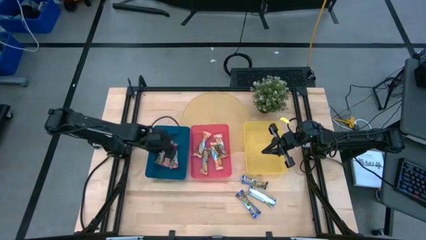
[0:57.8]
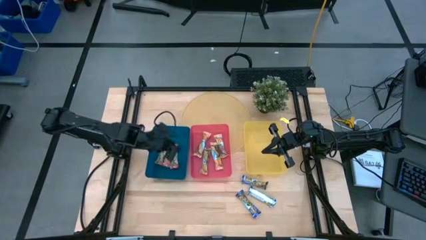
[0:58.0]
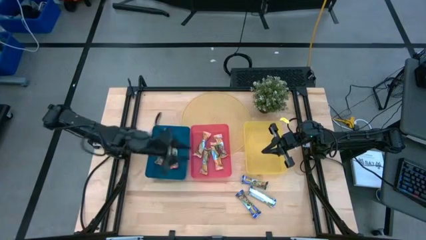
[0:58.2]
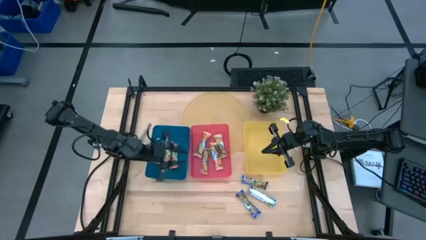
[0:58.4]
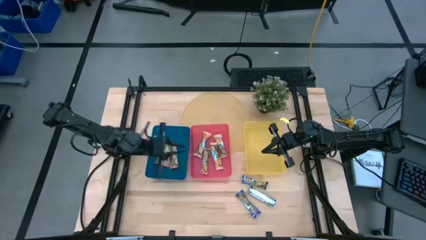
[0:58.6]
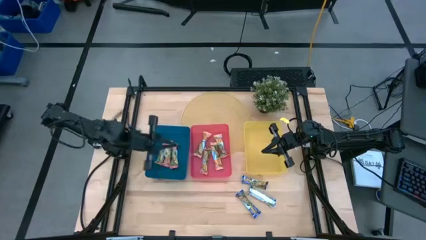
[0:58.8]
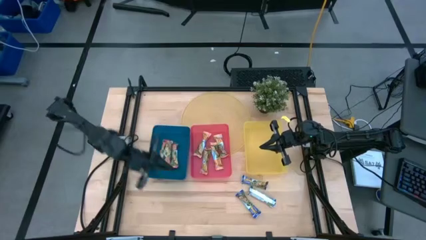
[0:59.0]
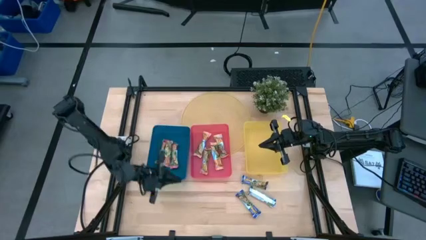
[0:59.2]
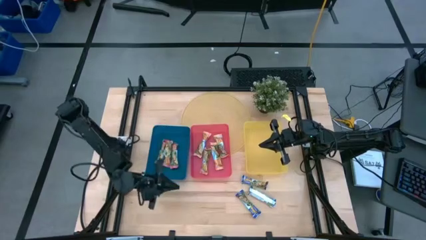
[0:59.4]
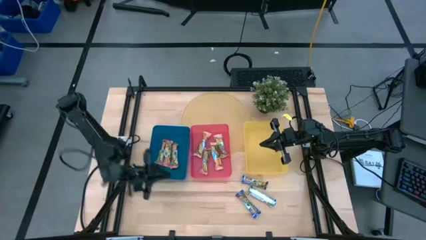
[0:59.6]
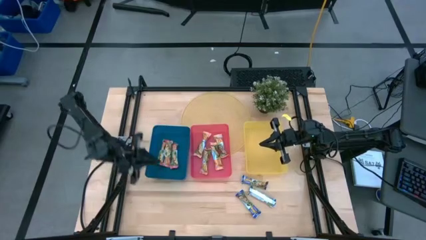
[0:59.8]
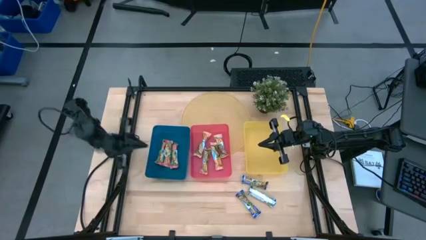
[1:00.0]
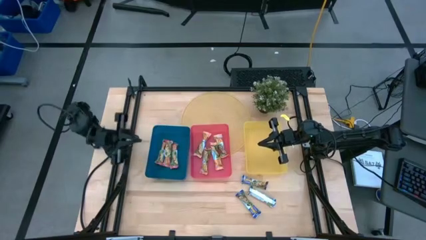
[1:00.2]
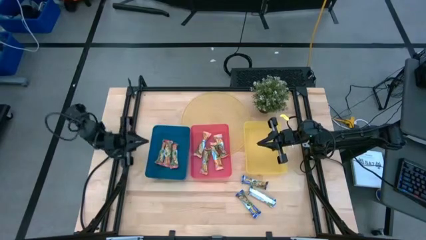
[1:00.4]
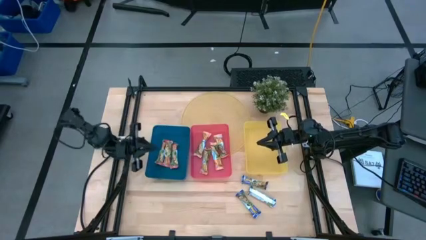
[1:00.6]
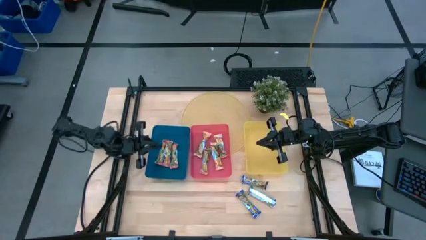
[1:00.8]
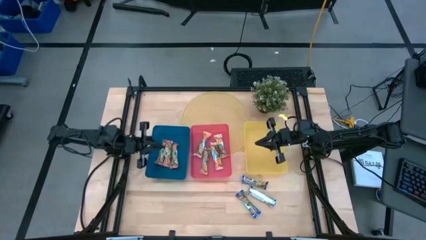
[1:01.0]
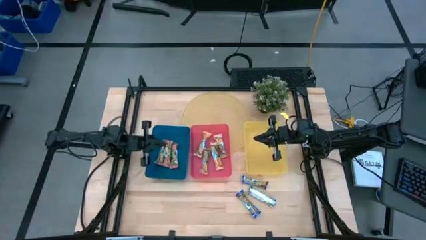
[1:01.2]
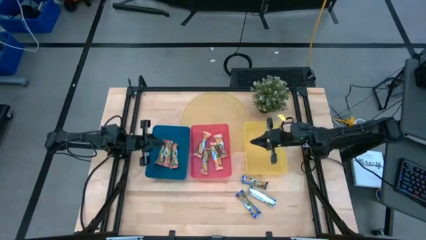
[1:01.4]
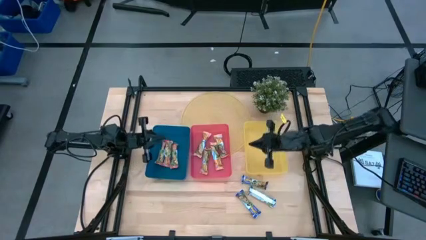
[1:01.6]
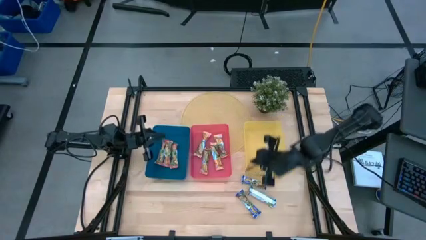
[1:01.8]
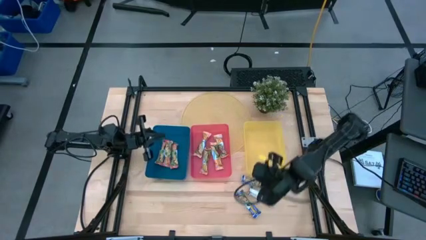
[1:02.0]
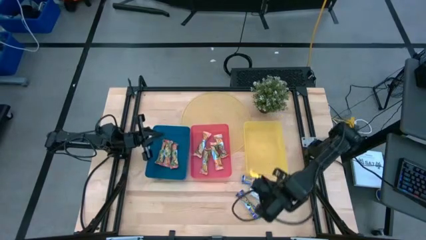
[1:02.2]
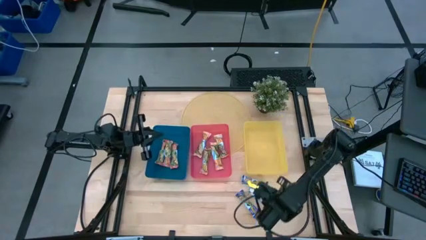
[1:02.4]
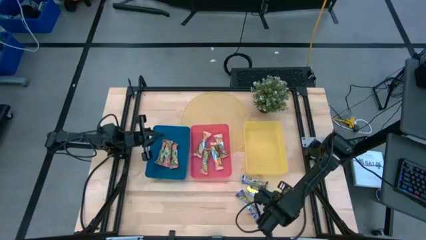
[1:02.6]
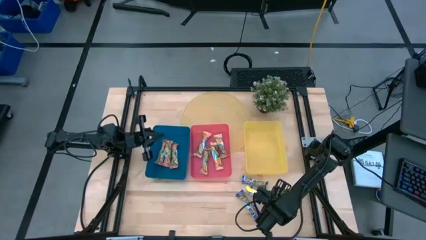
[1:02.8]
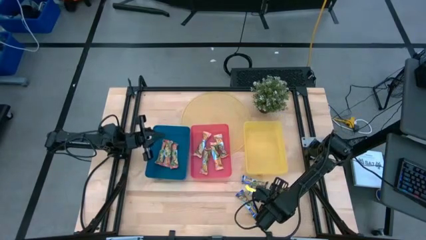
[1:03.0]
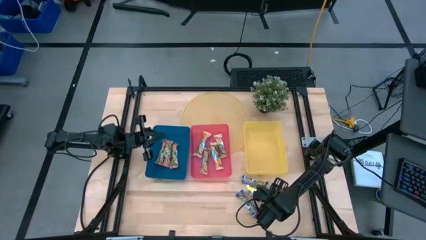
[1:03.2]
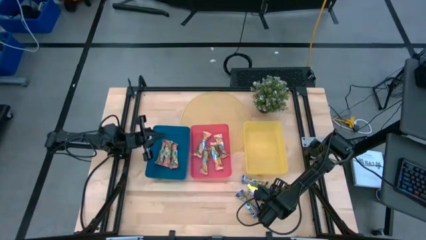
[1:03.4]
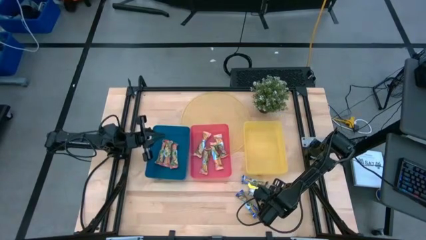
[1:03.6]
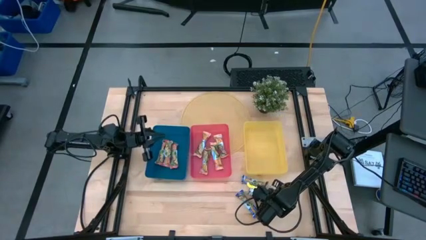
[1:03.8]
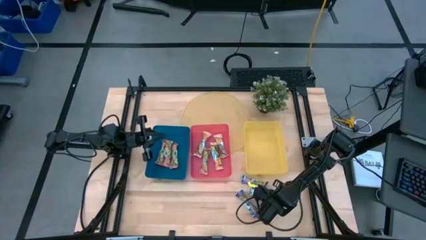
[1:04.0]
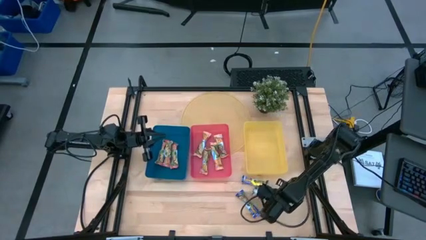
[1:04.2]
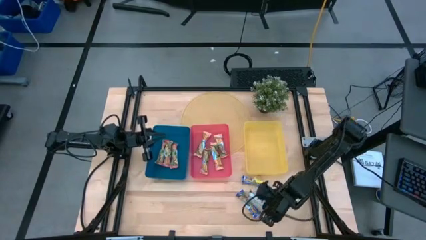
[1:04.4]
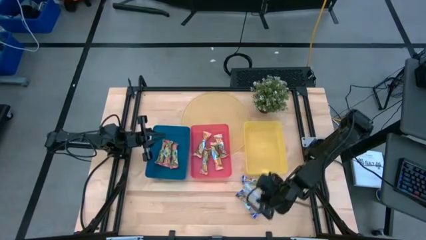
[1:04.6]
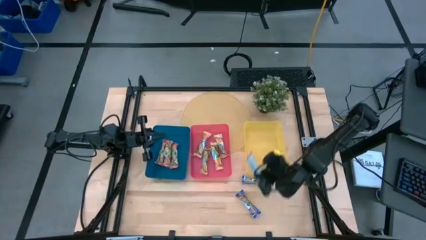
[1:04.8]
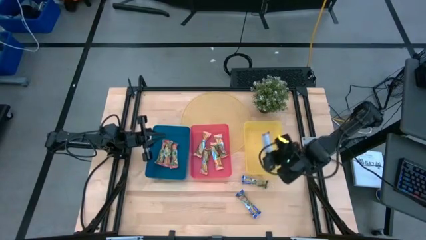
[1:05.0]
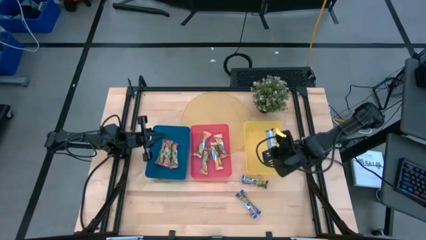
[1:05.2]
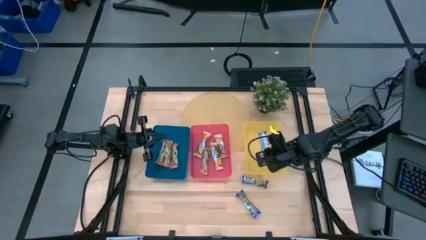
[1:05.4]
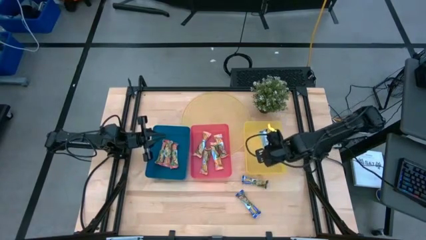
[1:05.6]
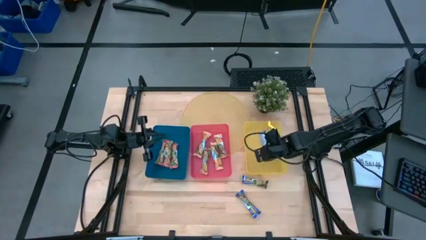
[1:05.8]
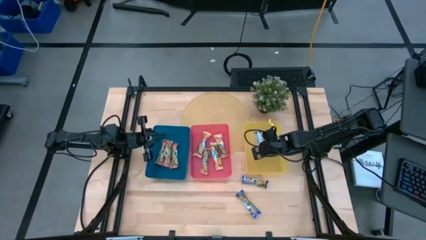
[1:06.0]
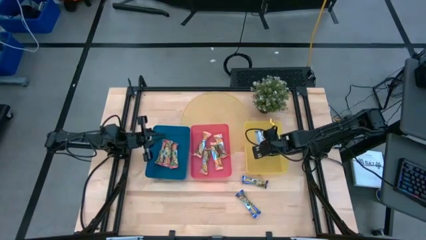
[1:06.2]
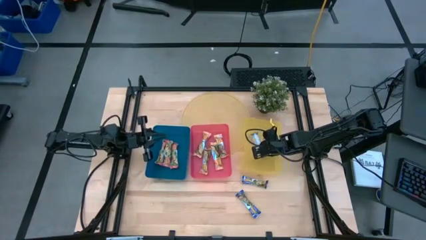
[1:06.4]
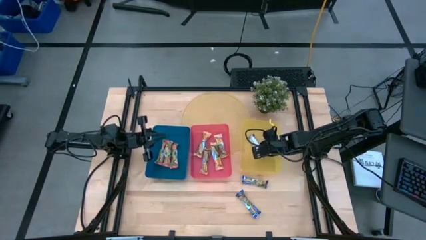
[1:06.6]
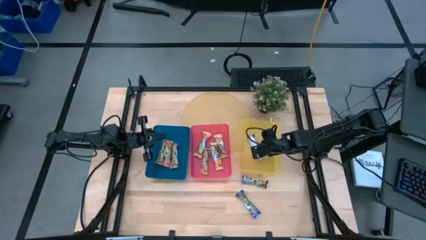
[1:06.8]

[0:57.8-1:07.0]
Task: Pick and place Granola Bars by type
Put the blue granola bar into the yellow bin

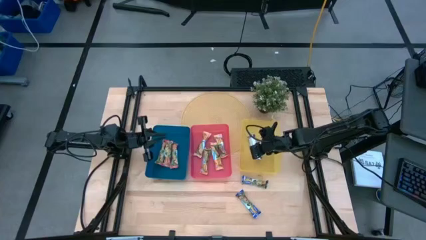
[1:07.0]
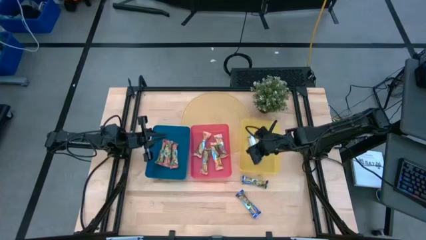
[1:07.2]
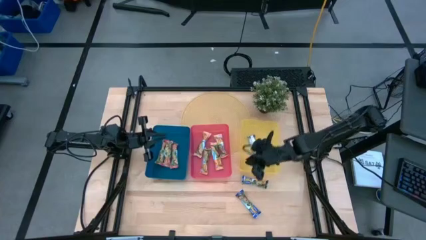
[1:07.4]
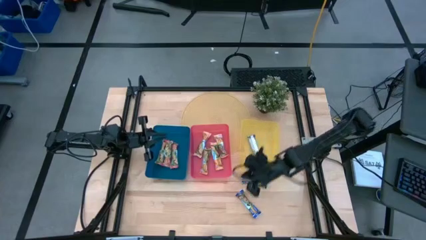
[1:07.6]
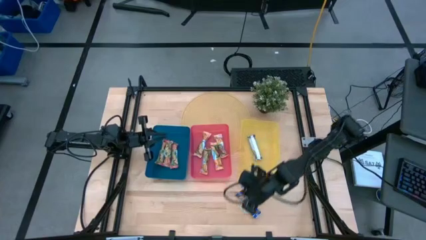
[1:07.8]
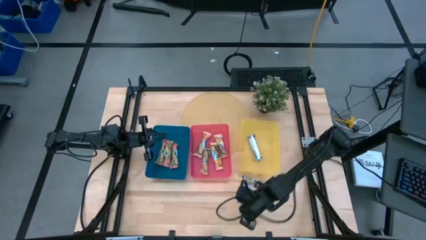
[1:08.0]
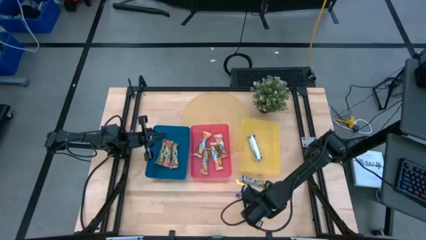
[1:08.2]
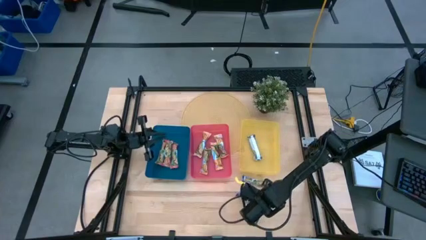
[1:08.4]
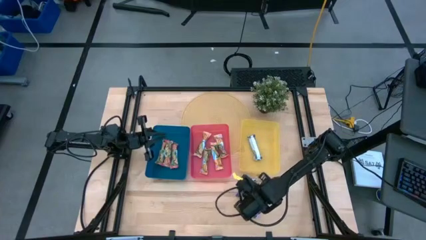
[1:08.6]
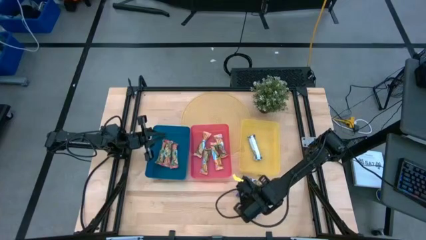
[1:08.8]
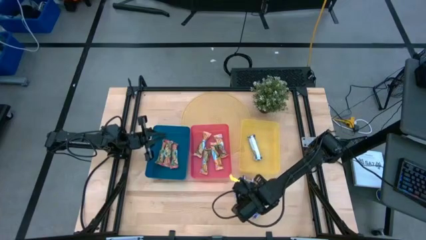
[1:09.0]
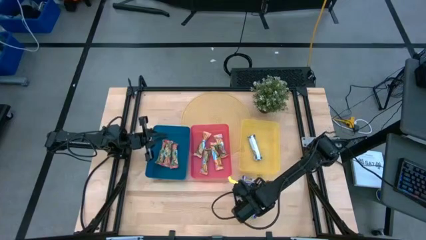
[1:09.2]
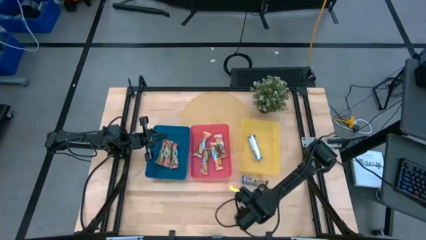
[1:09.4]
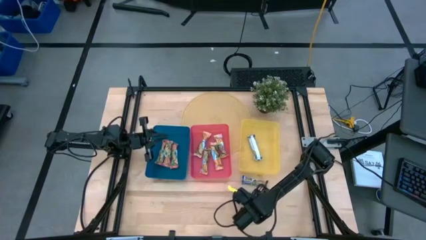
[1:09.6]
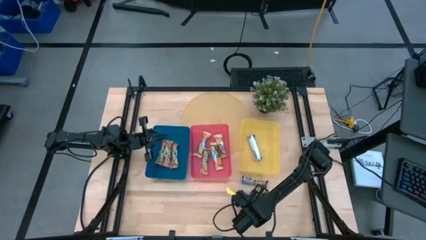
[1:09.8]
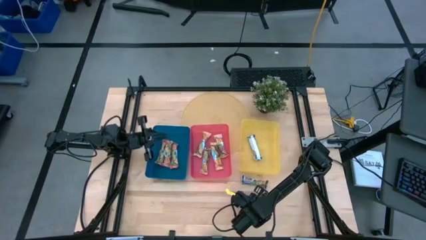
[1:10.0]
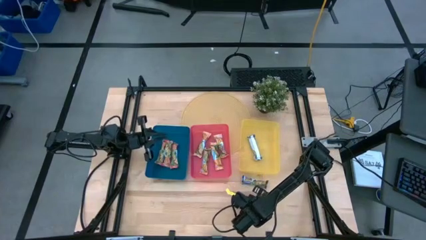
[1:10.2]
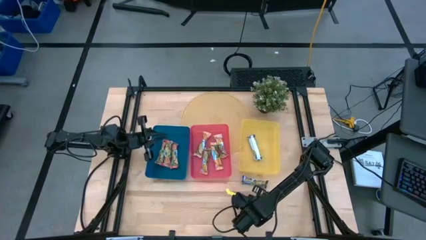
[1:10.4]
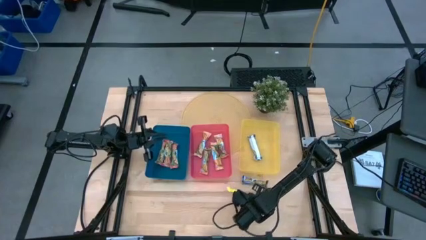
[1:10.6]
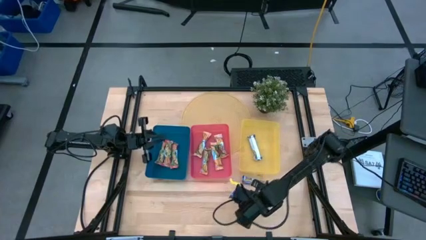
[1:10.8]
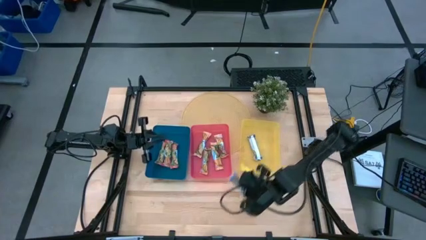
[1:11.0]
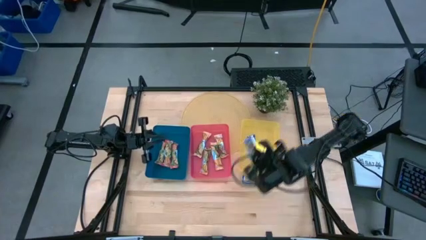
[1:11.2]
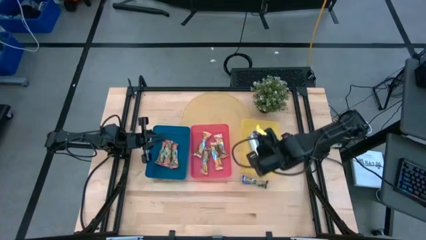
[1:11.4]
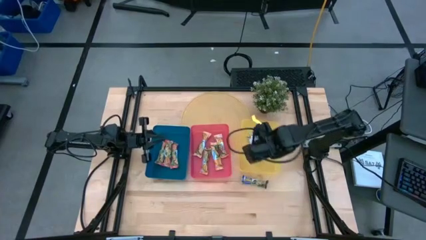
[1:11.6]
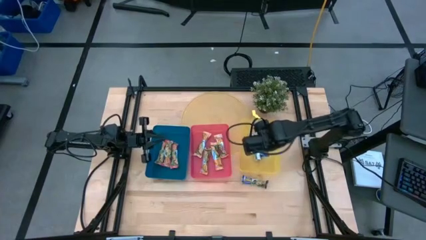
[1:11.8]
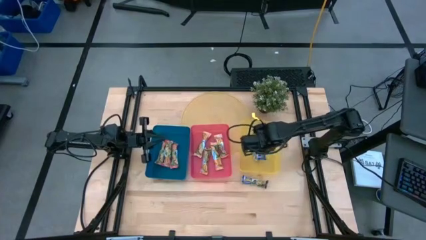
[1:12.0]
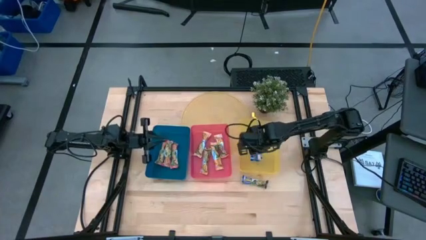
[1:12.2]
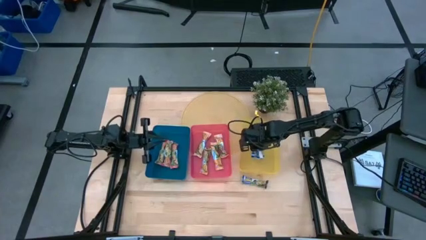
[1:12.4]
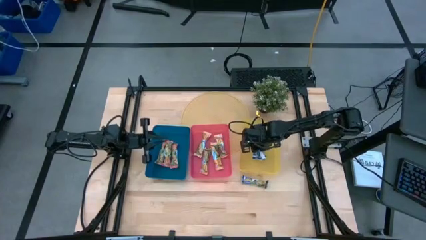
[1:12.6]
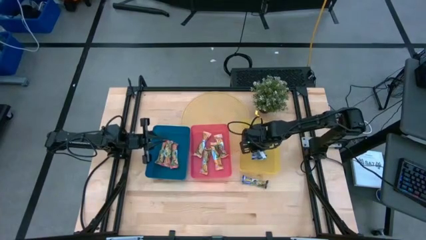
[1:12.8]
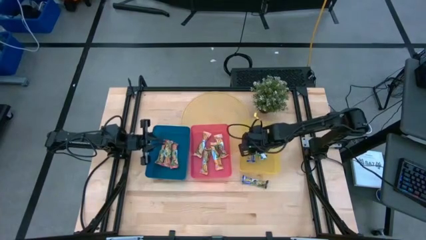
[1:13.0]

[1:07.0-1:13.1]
Put the blue granola bar into the yellow bin

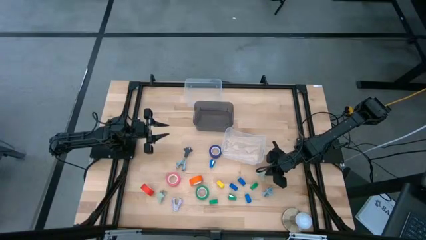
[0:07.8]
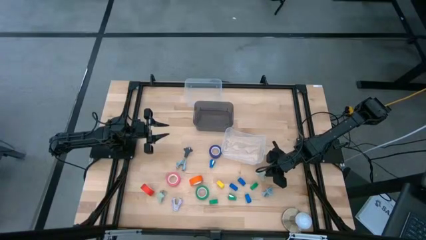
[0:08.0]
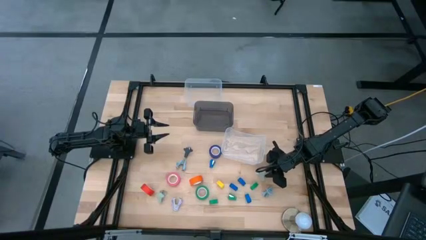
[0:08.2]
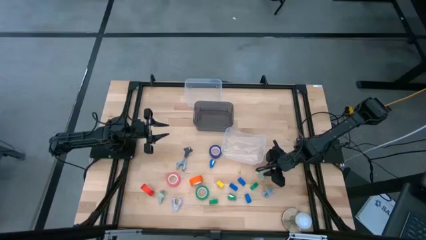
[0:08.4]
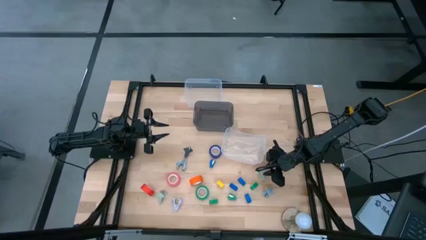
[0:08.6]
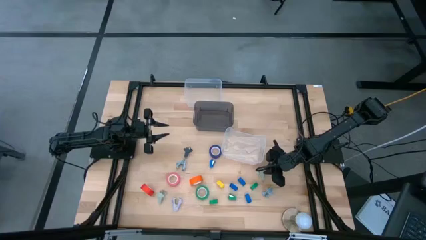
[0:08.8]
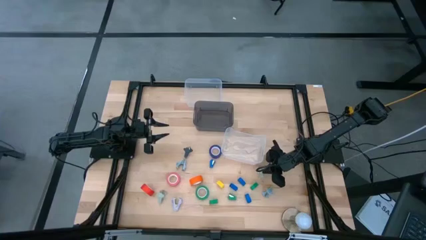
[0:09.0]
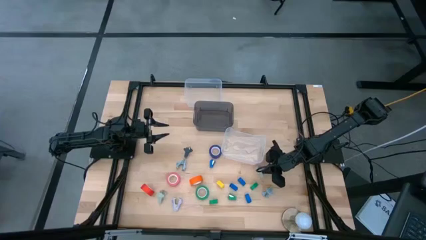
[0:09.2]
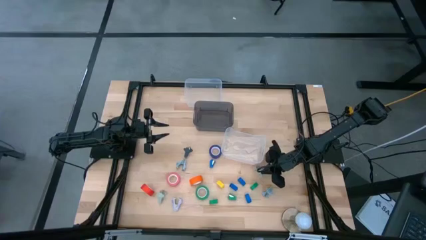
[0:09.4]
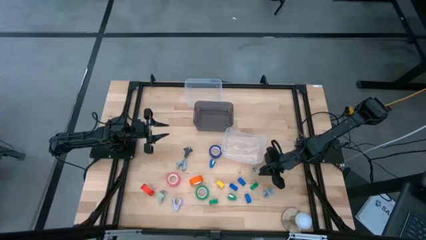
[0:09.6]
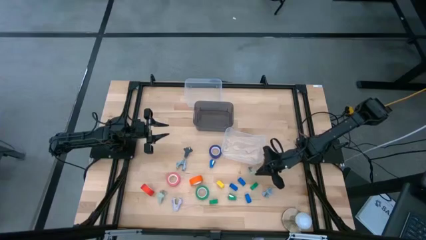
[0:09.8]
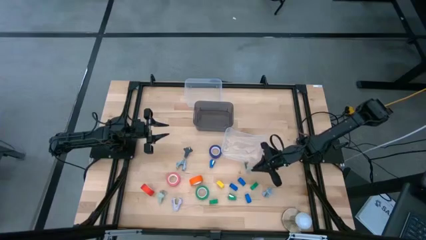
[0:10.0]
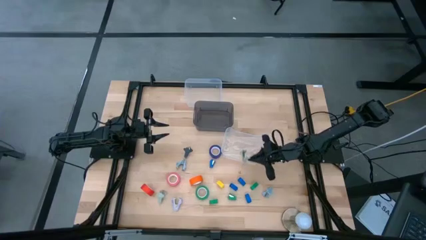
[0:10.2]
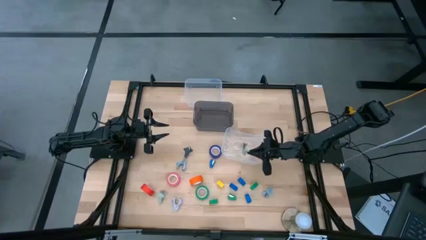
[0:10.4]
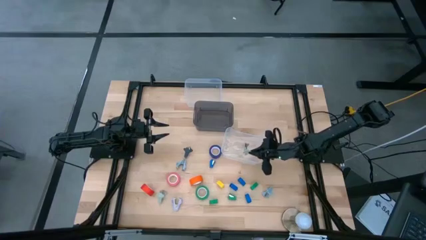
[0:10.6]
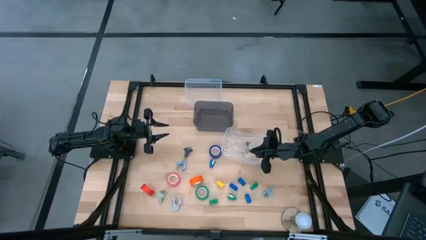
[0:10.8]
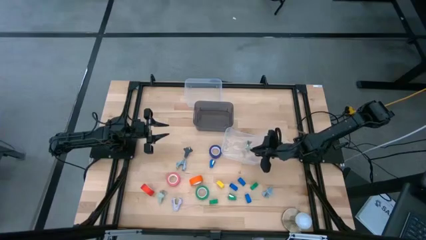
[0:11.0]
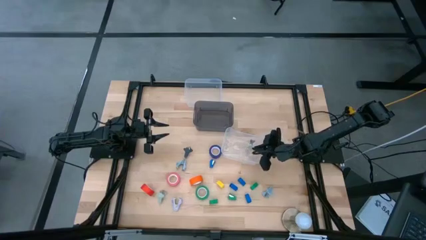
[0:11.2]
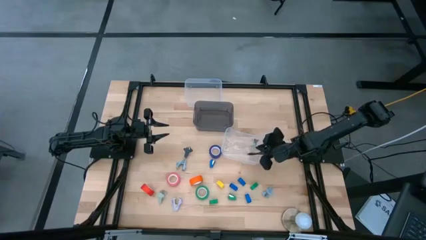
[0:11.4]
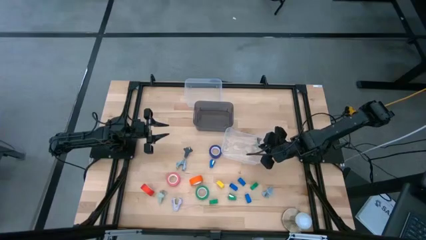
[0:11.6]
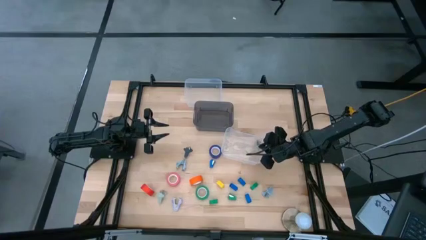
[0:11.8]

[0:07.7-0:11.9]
Task: Pick and place Stapler, Stapler remover, tape
Put the gray staple remover into the bottom transparent bin
